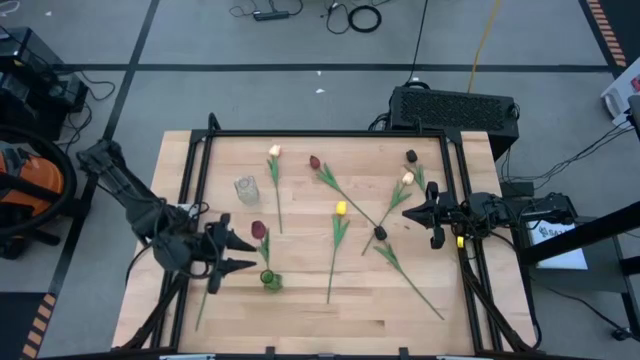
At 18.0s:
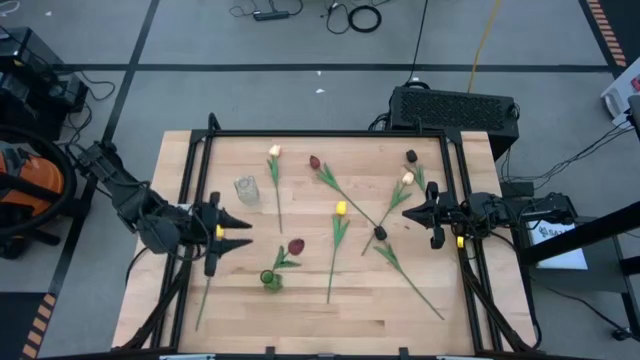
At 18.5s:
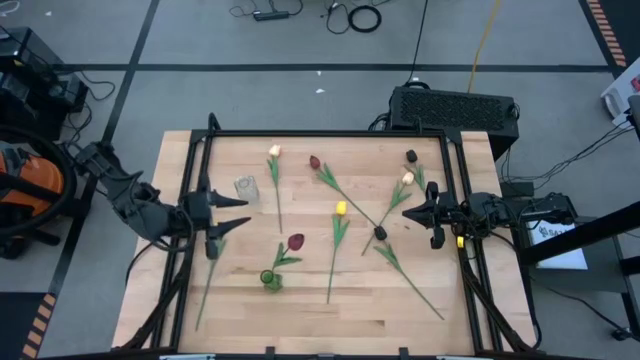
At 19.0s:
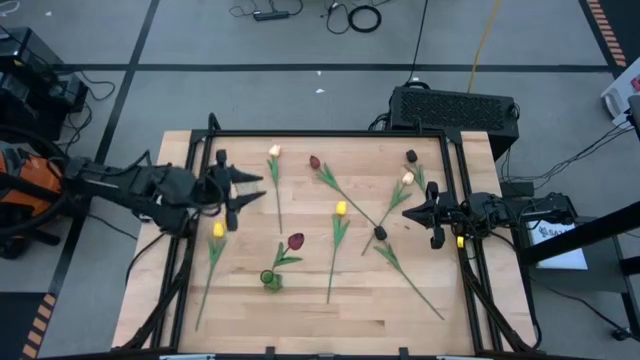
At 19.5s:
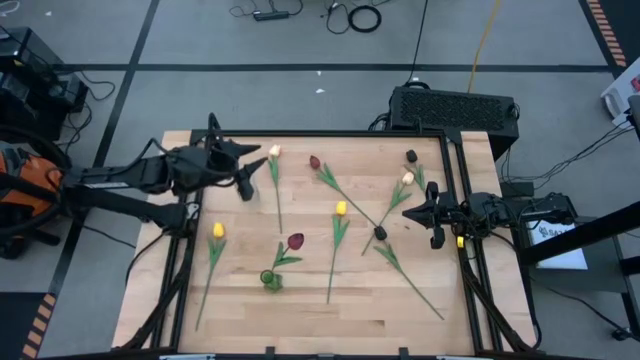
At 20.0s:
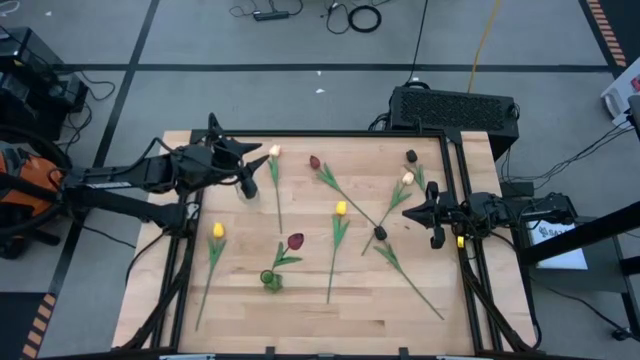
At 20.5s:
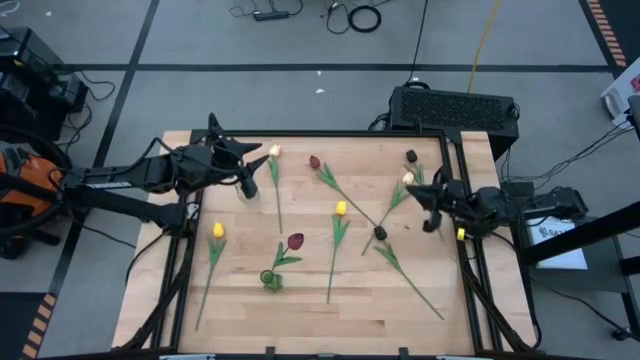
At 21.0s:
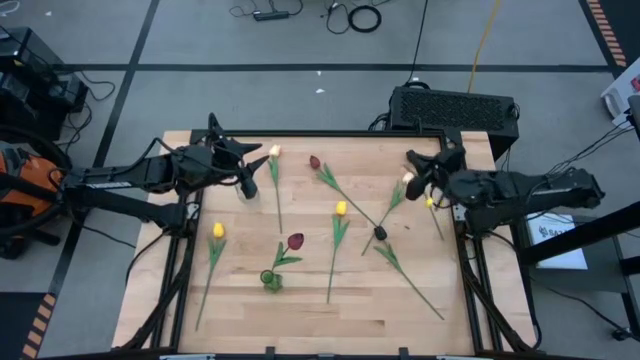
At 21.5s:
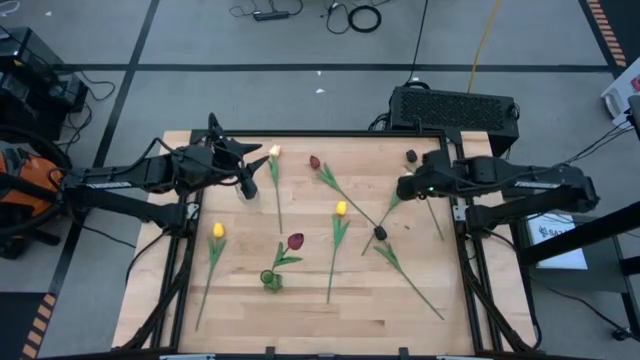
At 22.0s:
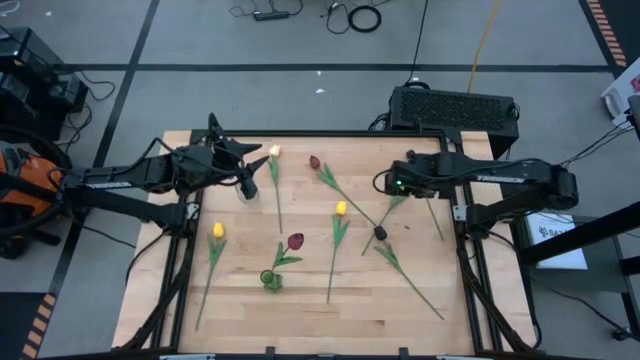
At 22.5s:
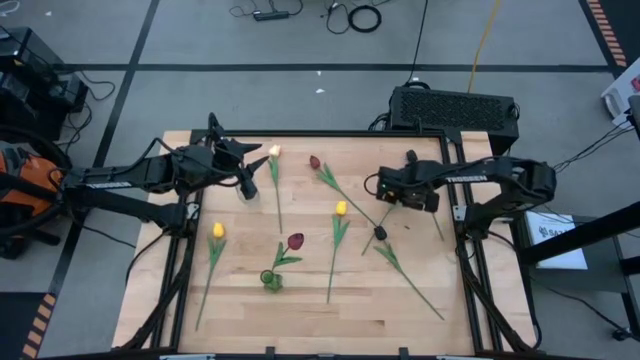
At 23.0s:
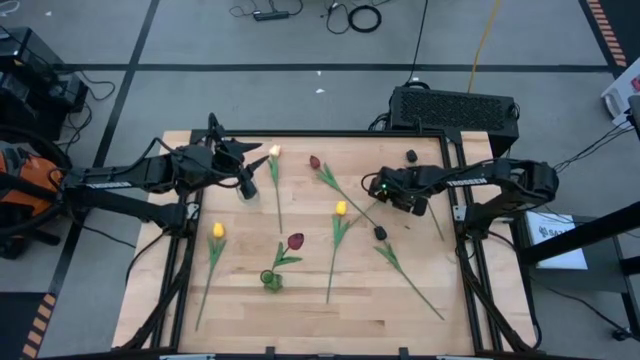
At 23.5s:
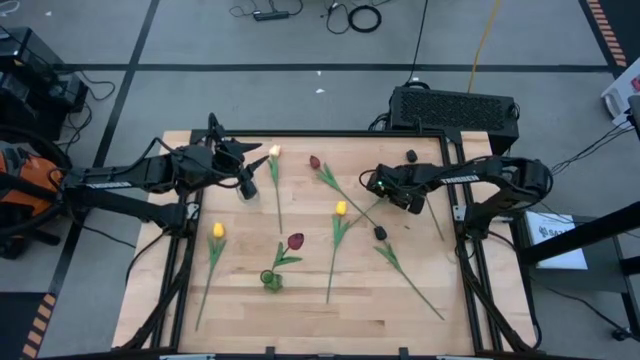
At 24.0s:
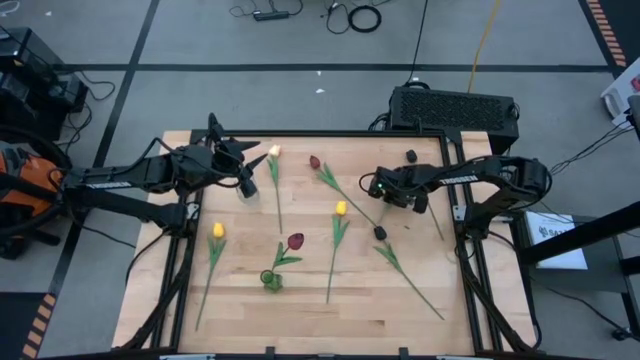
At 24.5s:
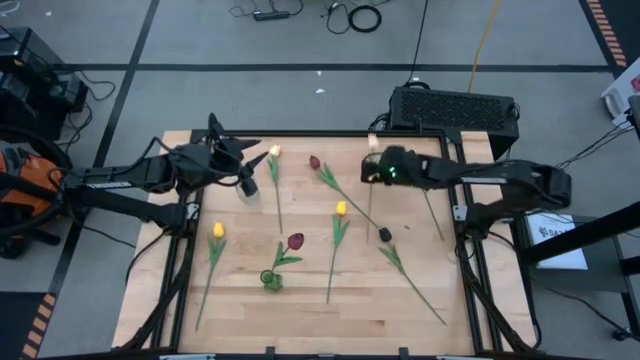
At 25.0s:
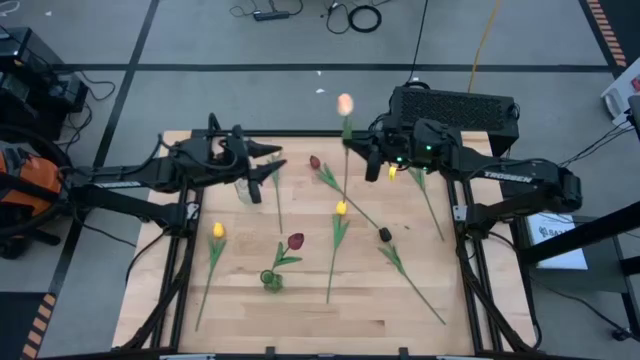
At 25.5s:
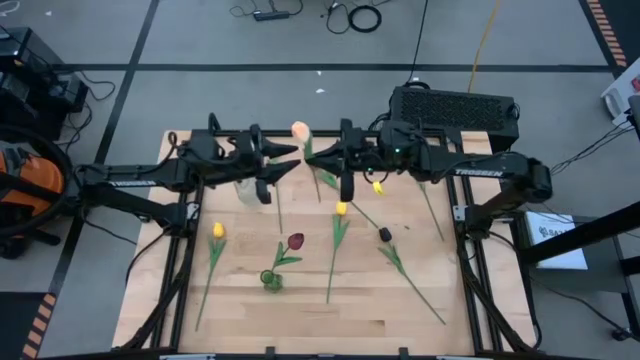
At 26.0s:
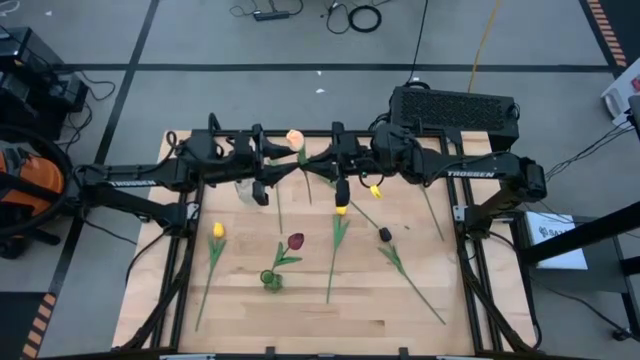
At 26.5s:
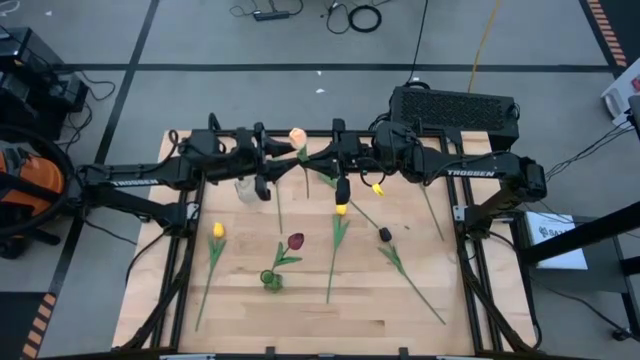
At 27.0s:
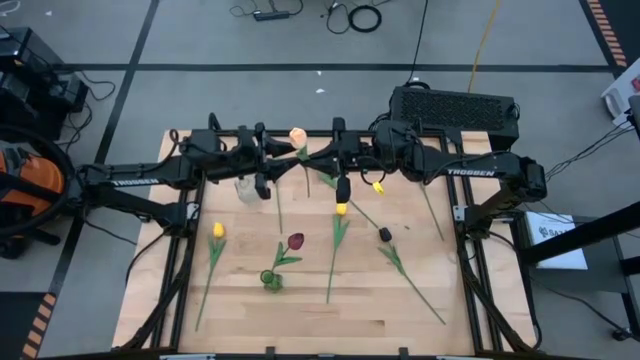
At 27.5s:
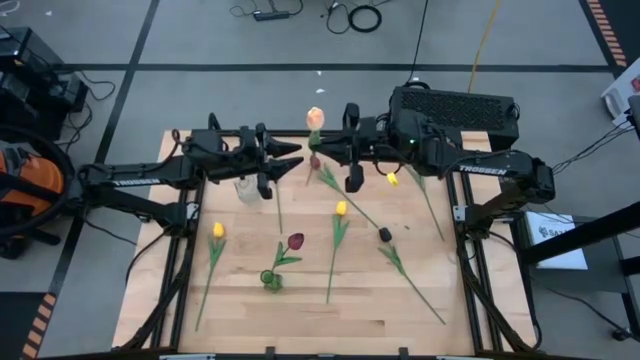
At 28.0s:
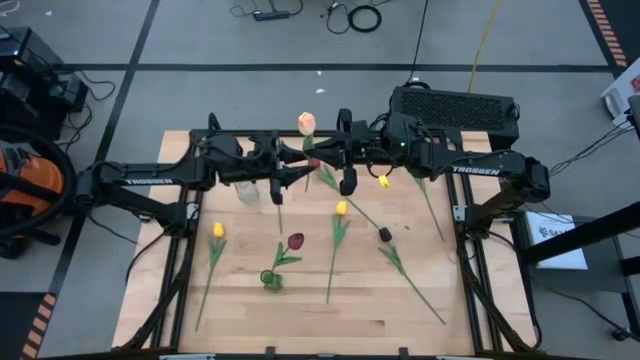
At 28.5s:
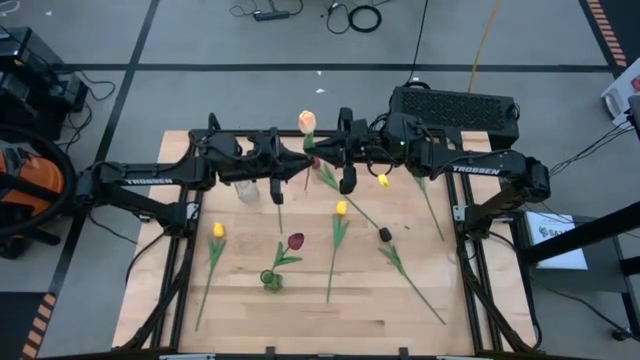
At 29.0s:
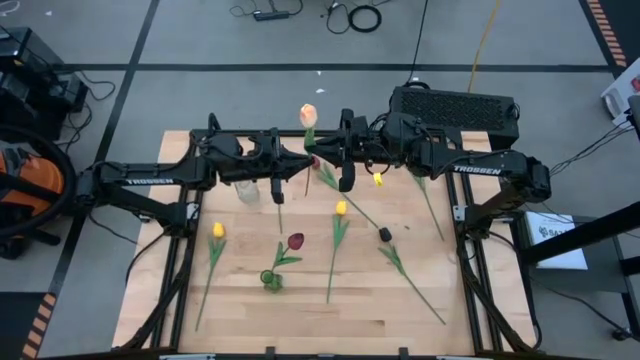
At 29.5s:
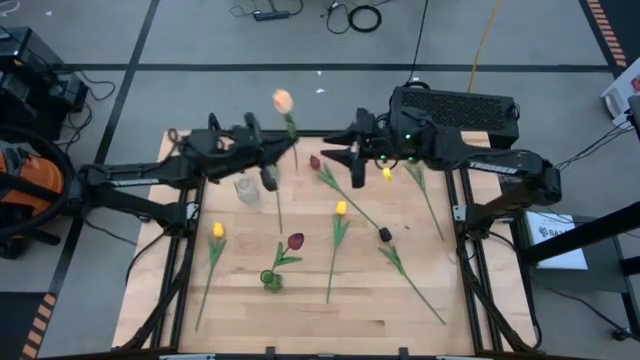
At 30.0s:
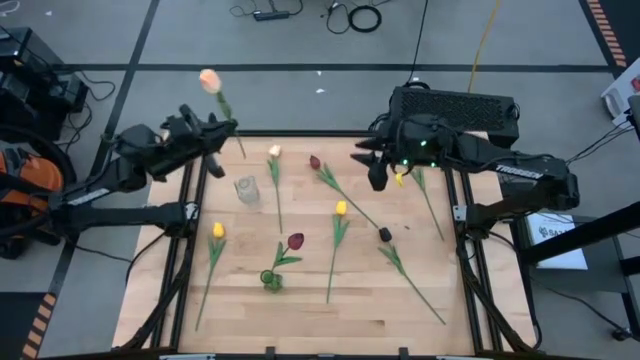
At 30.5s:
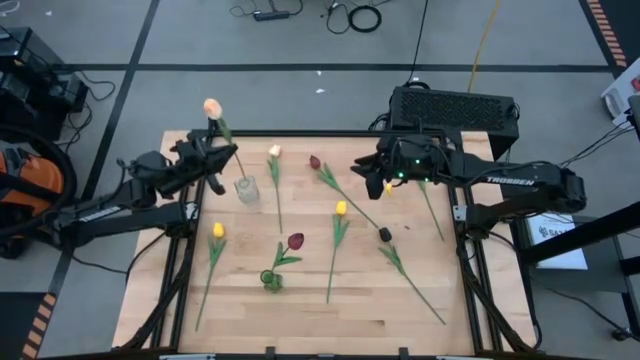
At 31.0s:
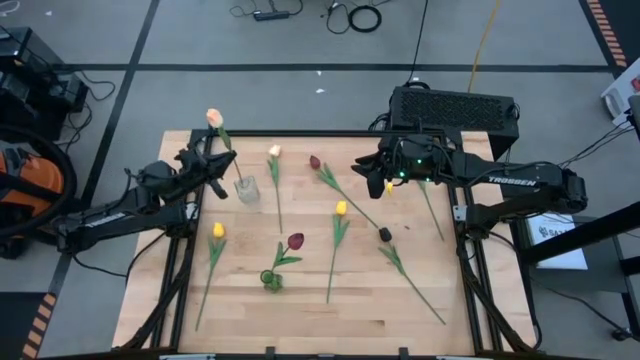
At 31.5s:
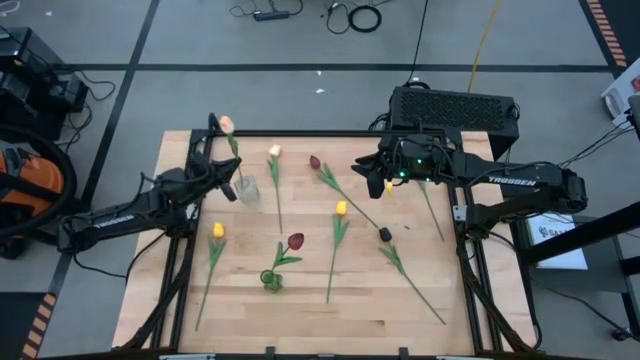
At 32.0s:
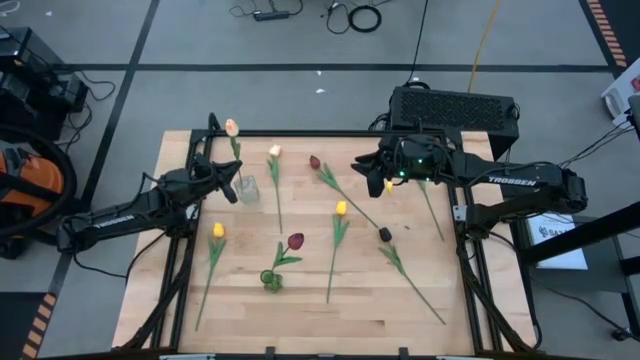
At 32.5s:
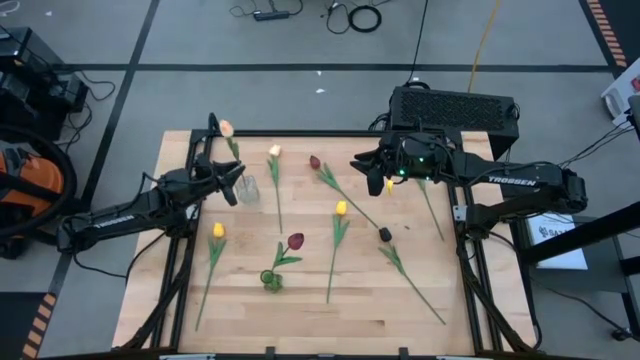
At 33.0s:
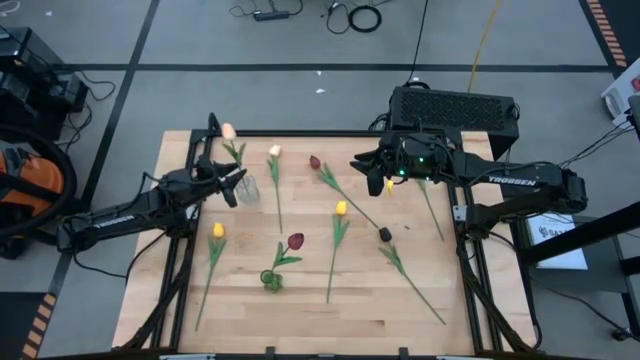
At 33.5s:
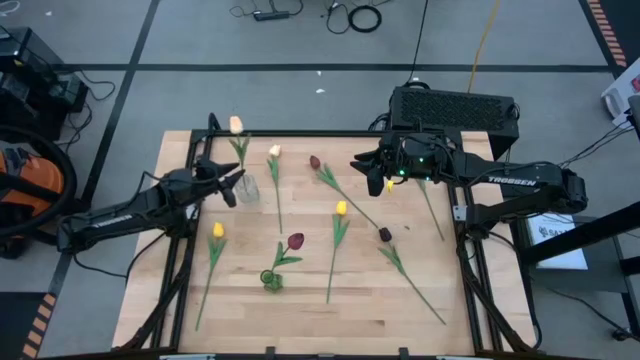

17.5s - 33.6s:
Task: Sort flowers into vase by color
Put the right orange tulip into the transparent vase

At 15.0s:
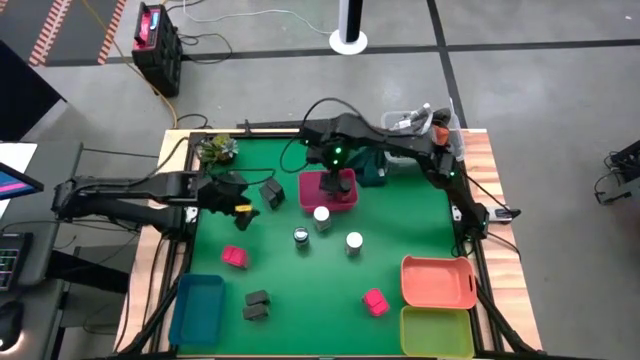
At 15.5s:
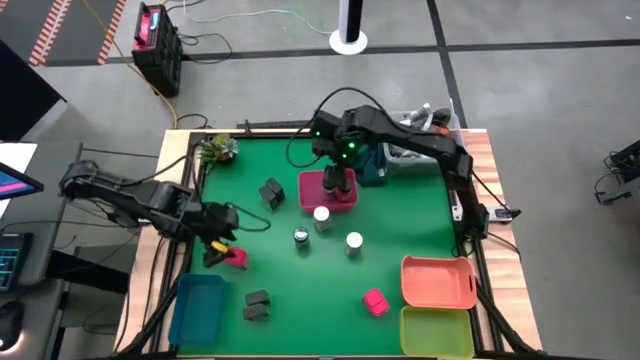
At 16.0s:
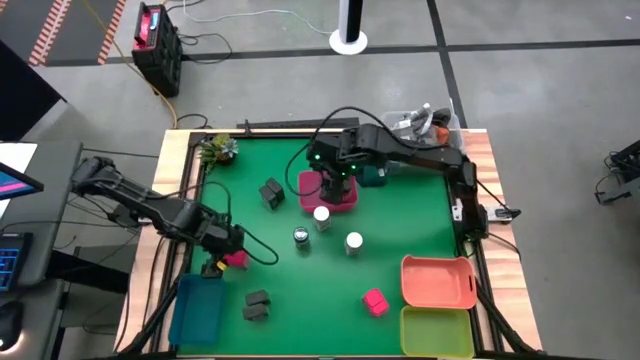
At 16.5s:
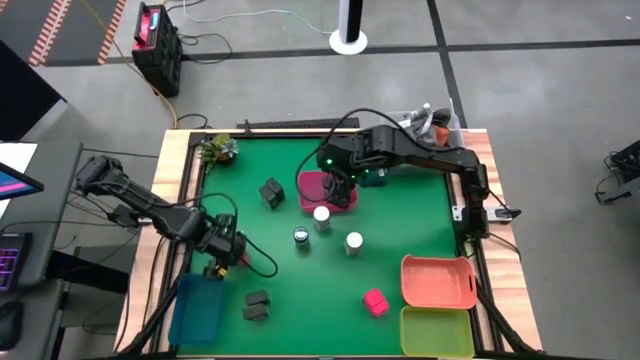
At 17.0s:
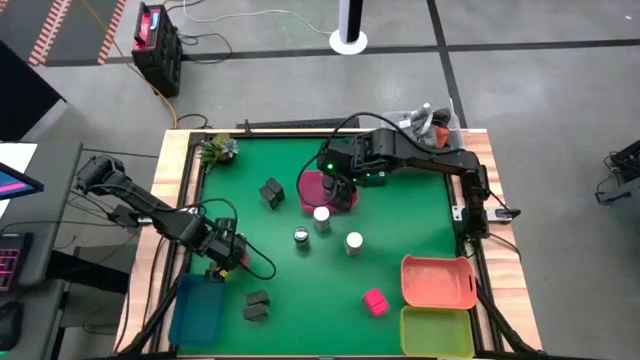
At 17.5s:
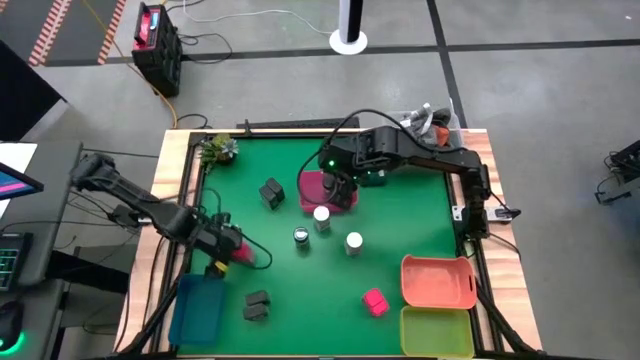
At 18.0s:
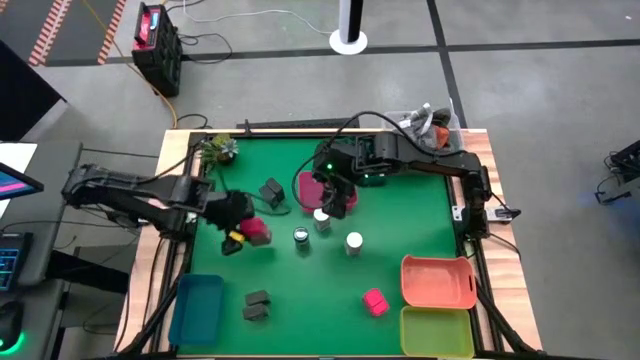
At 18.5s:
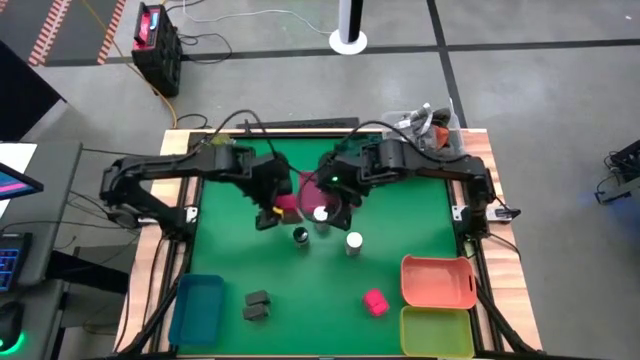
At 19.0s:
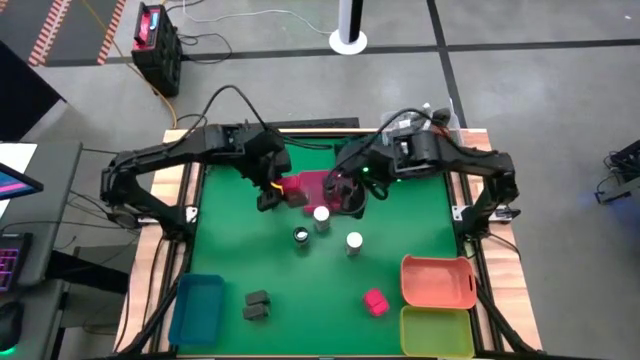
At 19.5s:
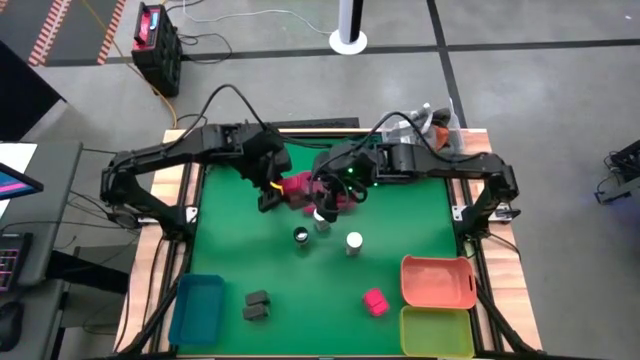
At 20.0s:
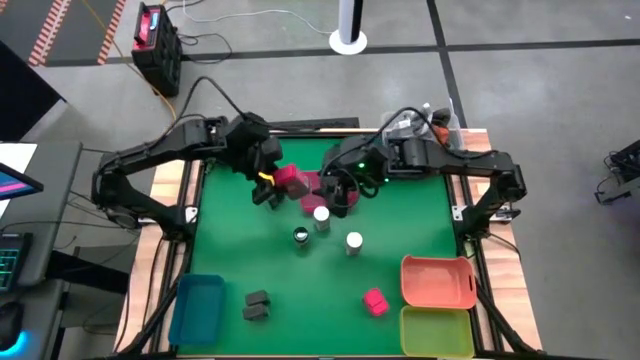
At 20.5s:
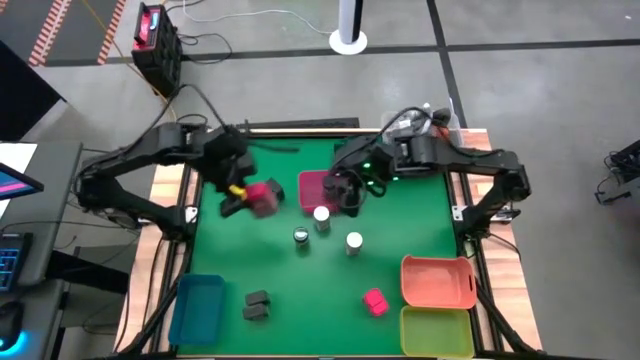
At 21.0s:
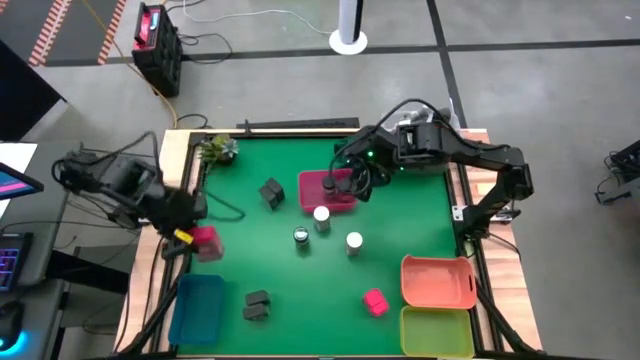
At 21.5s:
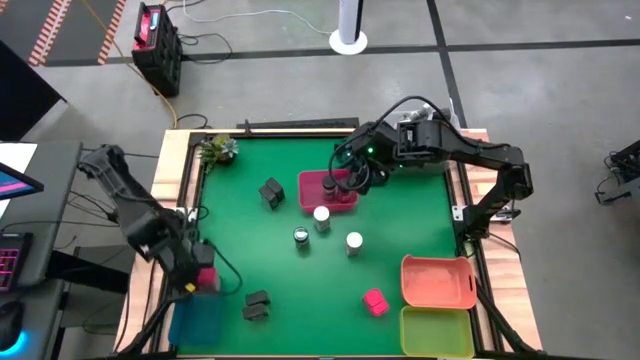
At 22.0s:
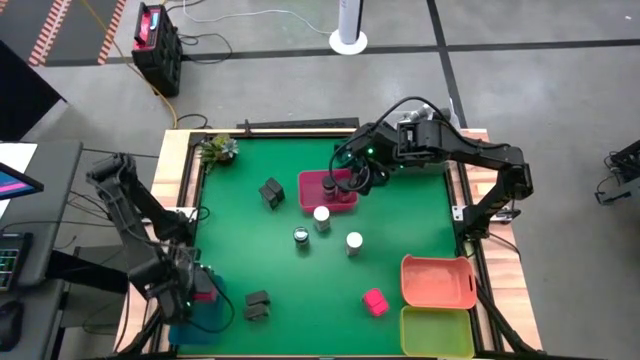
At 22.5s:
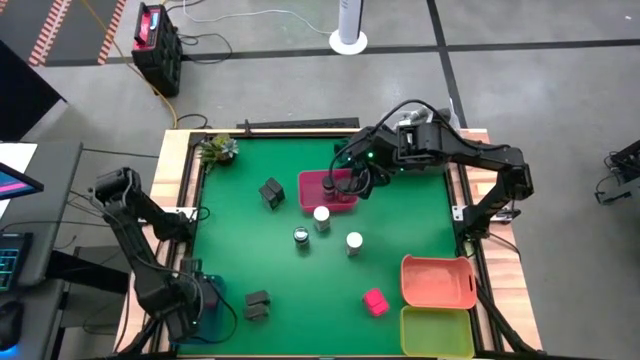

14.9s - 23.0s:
Task: Sort spices by type
Put the top red seasoning can into the blue bin
